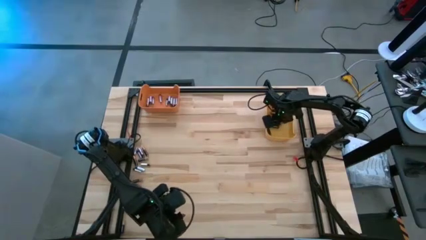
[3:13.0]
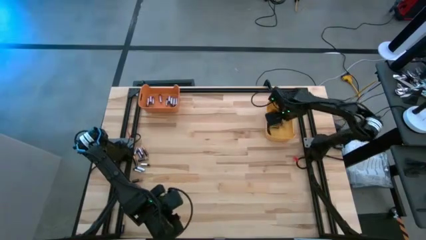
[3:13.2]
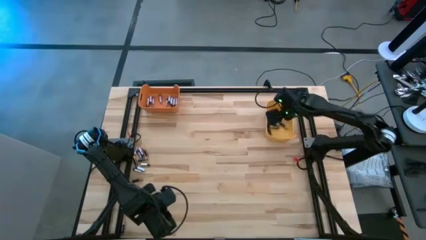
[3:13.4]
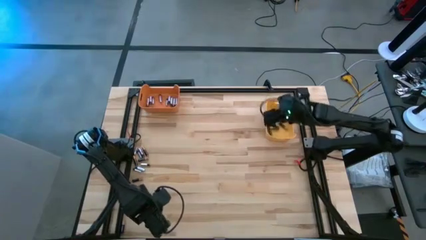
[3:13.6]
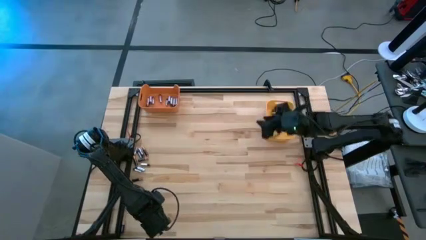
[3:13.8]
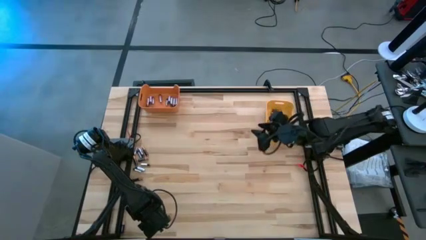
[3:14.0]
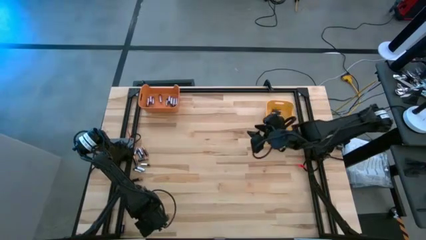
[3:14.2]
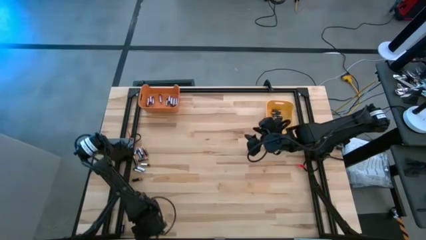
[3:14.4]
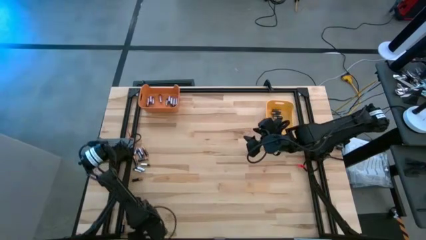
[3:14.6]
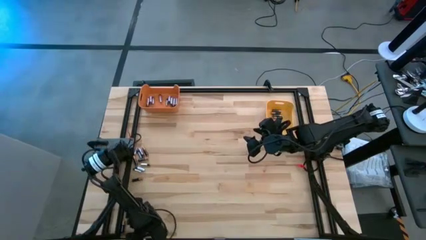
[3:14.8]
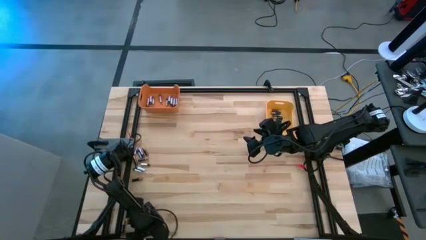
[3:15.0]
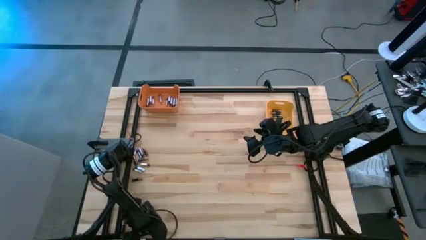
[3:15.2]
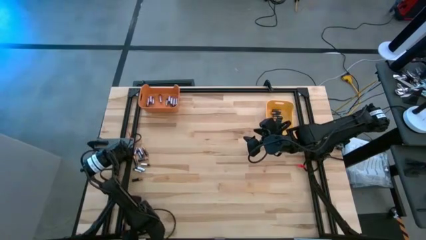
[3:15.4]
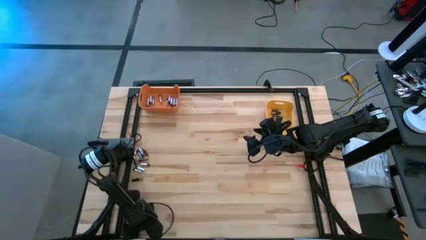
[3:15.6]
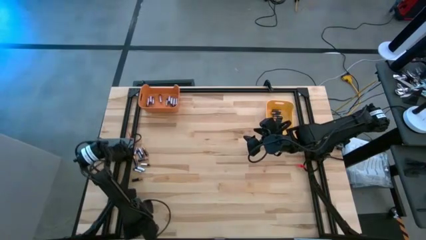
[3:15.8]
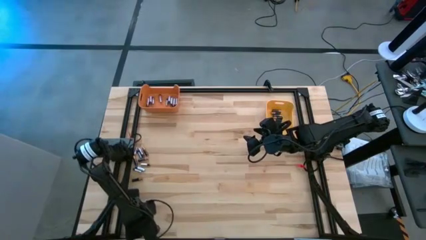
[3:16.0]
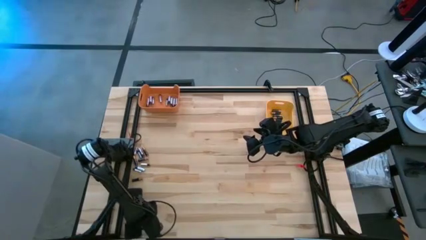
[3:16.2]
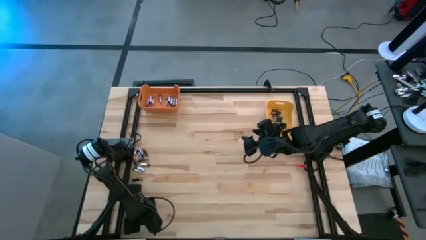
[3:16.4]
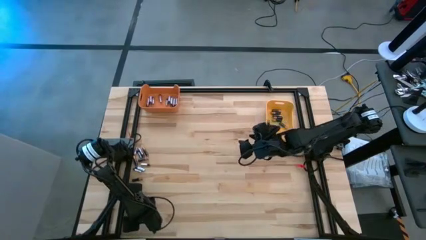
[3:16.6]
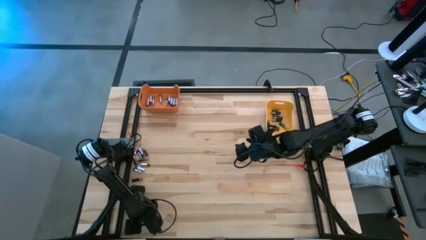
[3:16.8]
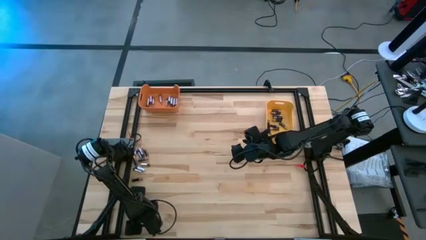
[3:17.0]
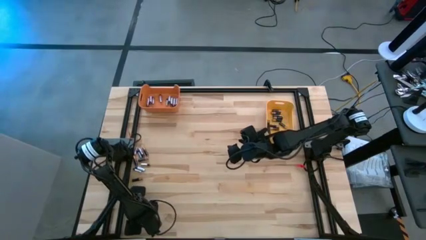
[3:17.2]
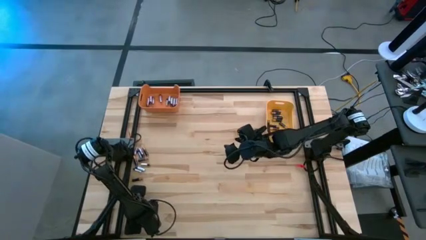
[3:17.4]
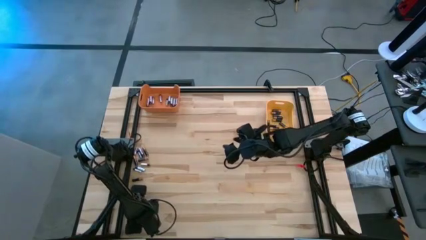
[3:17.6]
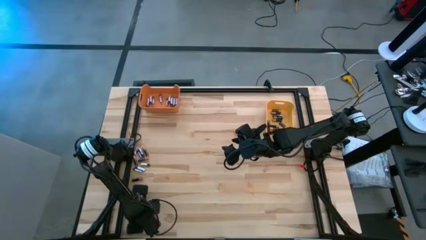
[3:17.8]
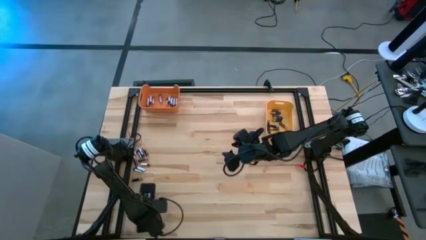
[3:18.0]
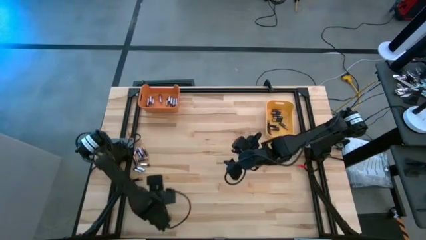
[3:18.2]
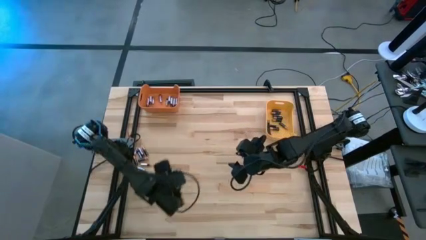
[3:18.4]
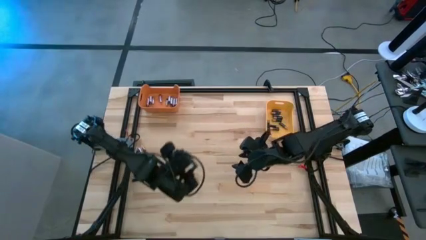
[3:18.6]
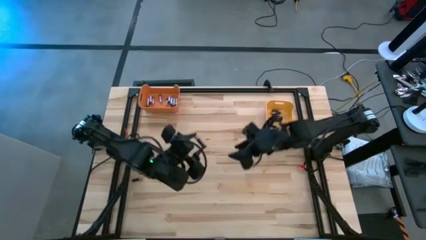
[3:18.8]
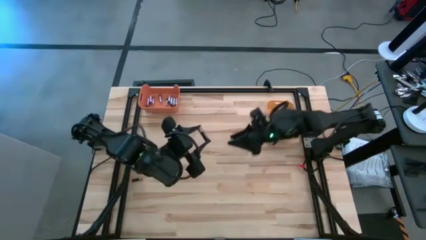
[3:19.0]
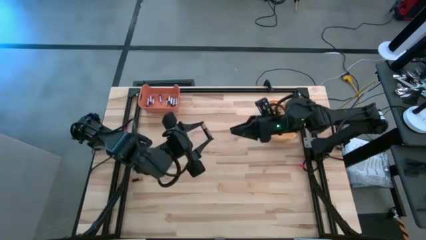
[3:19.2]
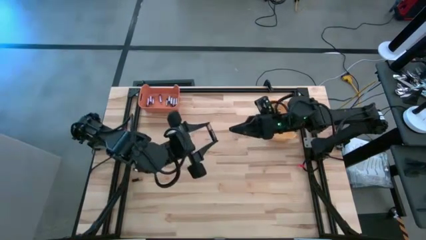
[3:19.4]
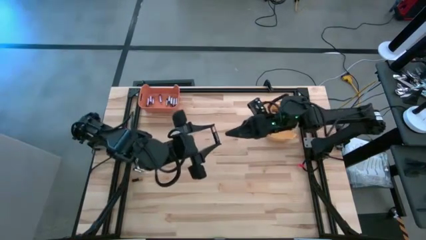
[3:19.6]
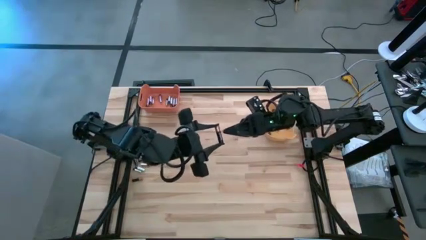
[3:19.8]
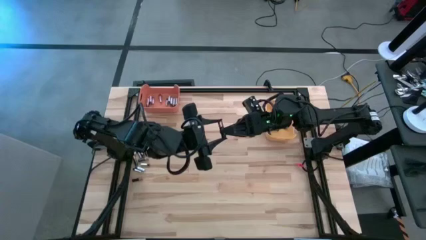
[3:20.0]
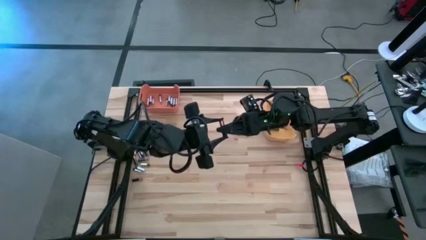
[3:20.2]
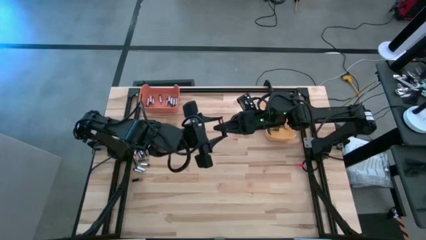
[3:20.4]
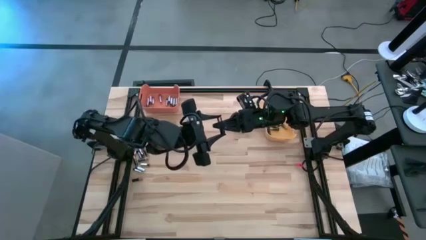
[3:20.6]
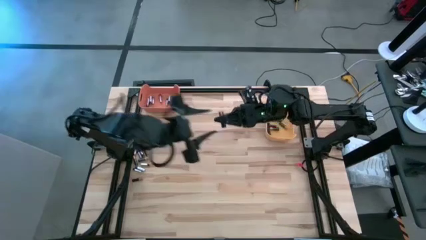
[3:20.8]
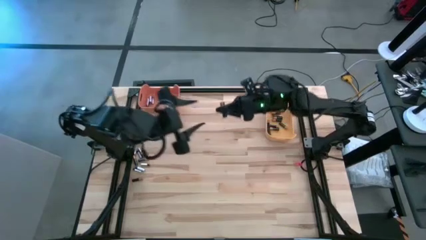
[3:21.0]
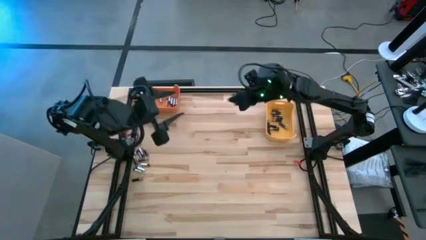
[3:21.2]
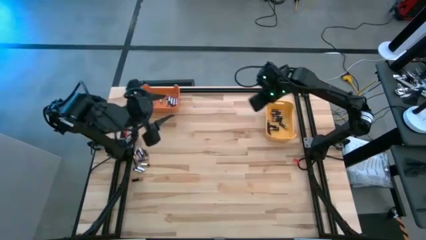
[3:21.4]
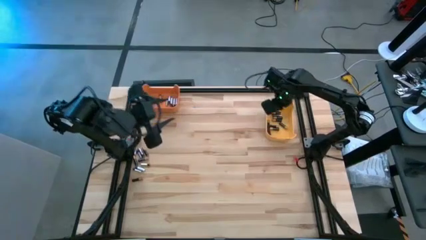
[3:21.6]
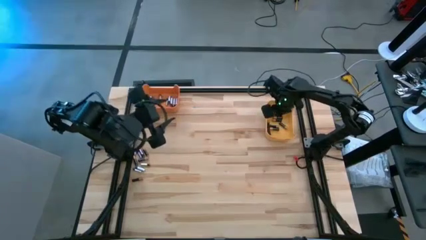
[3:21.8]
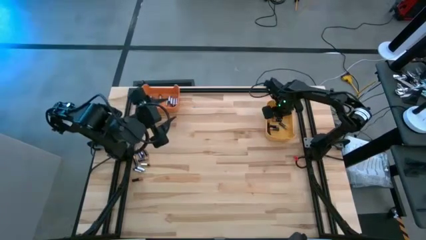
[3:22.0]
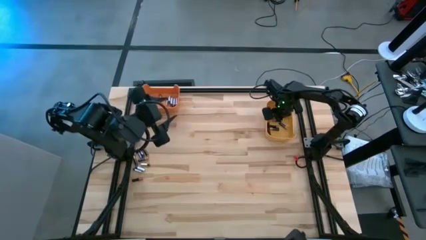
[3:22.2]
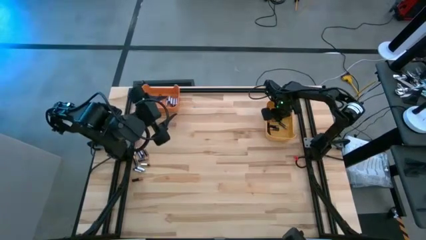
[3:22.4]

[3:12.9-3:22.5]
Task: Sort batteries
Put the black battery into the yellow bin

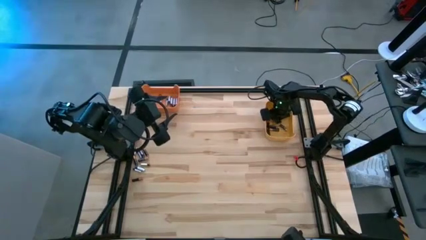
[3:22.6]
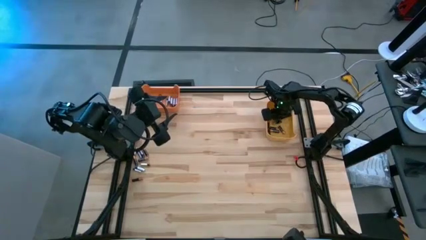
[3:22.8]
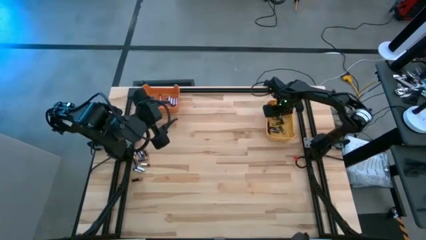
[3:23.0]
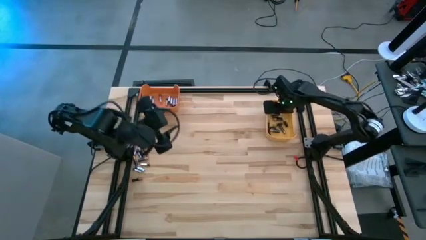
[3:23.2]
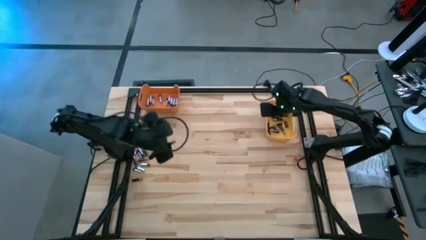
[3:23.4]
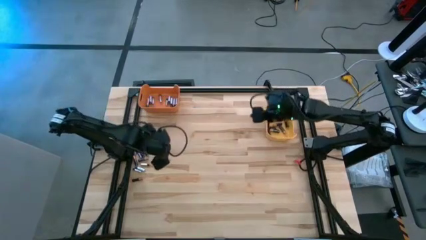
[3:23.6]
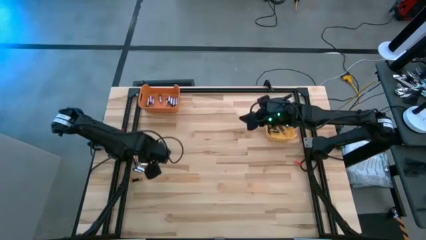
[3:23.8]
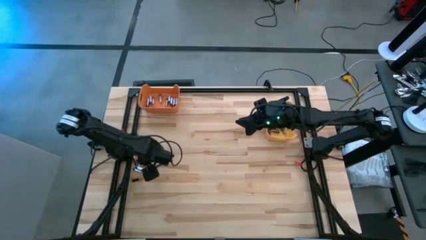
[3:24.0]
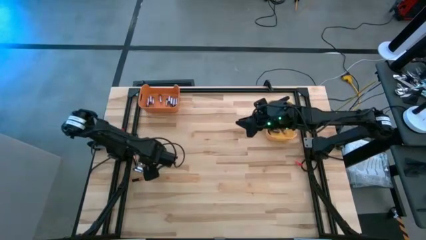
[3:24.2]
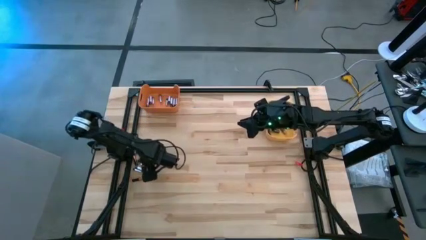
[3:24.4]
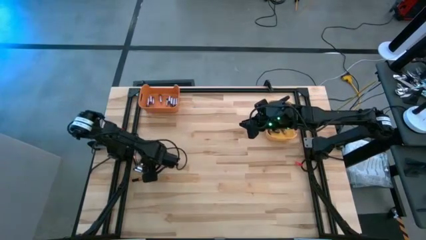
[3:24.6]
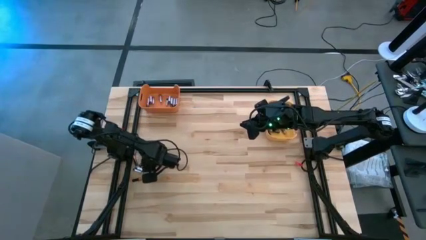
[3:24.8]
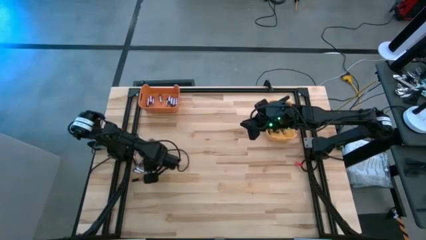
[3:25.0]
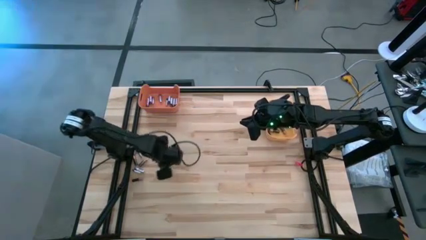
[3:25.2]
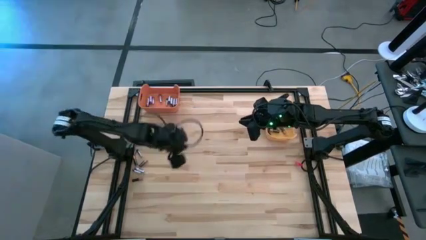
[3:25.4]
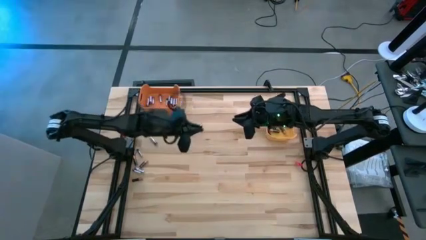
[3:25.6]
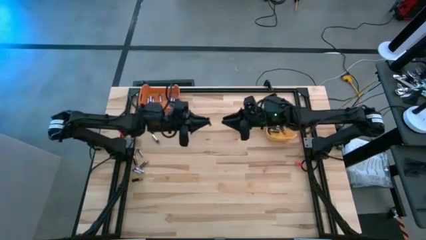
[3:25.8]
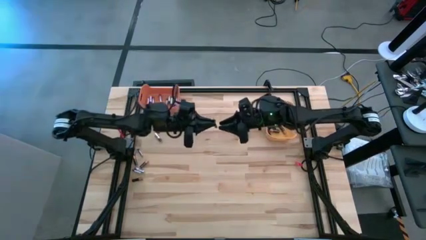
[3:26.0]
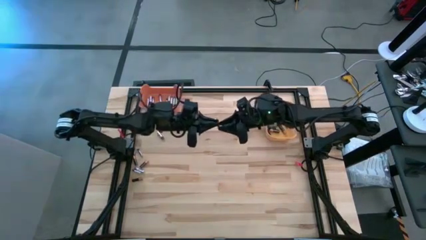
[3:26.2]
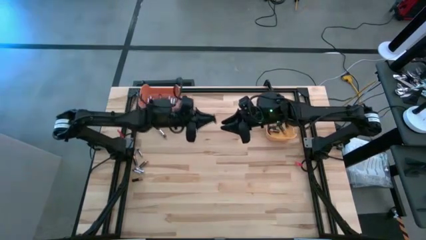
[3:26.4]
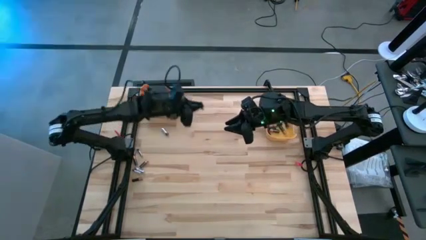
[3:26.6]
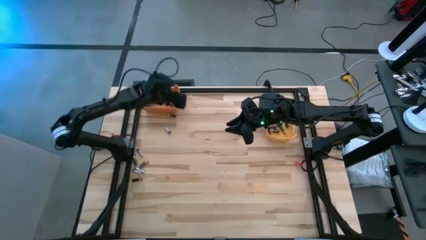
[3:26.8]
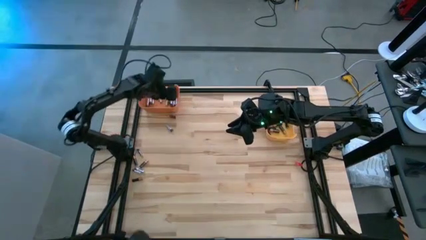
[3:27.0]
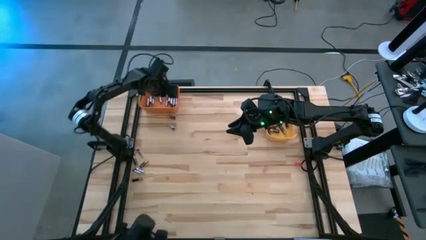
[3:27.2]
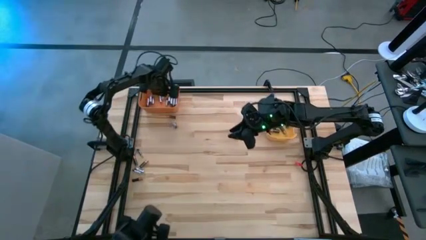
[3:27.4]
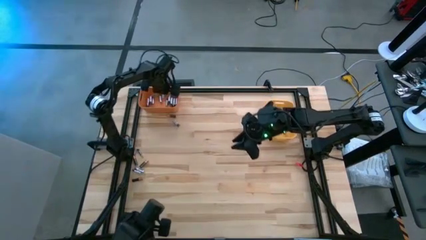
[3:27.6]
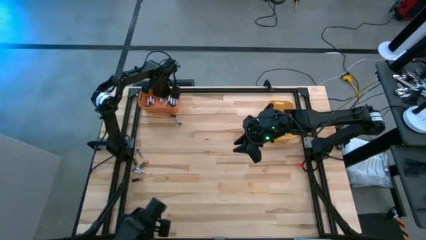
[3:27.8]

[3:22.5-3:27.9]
Put the silver battery into the orange bin

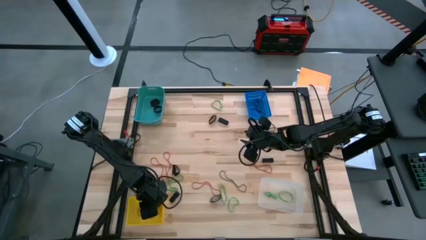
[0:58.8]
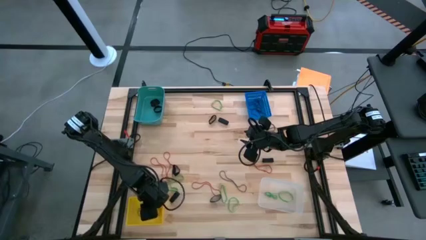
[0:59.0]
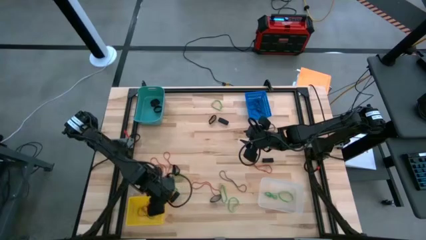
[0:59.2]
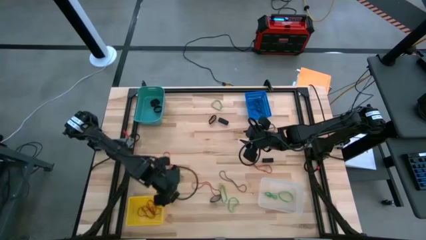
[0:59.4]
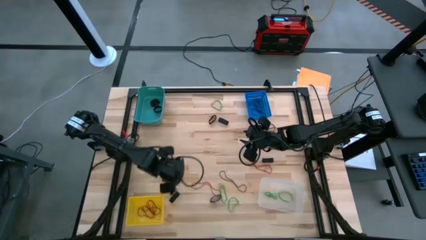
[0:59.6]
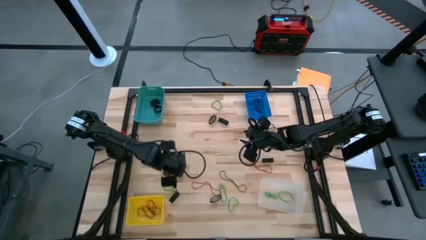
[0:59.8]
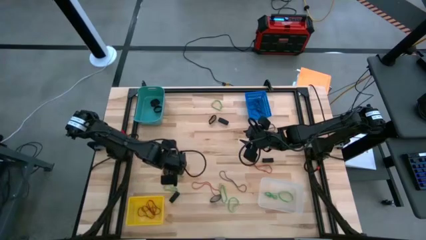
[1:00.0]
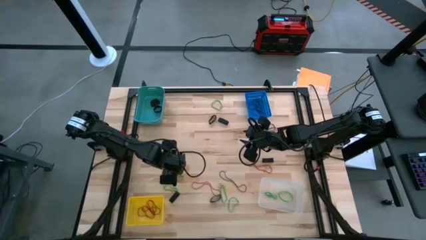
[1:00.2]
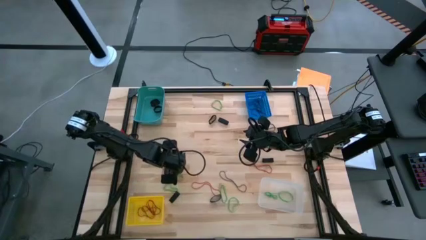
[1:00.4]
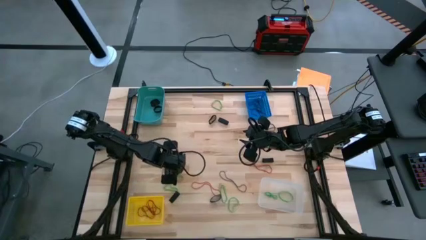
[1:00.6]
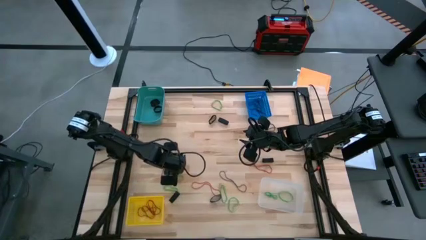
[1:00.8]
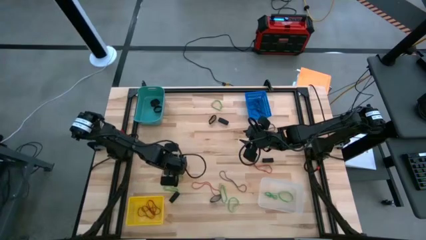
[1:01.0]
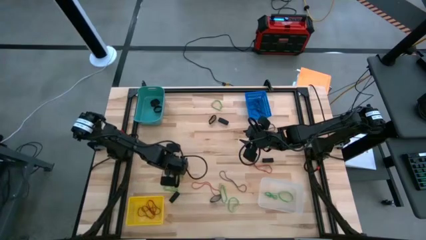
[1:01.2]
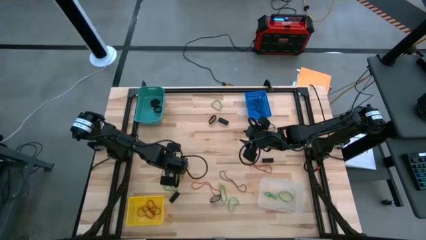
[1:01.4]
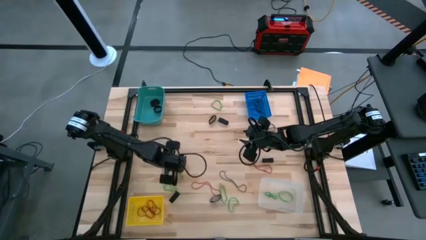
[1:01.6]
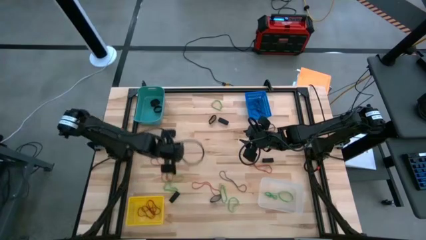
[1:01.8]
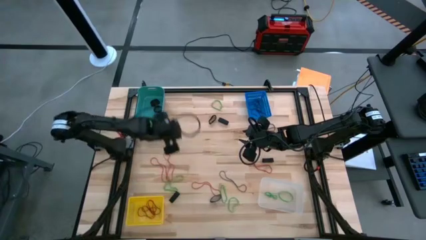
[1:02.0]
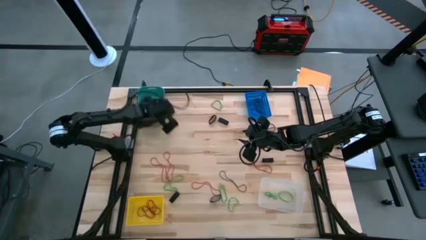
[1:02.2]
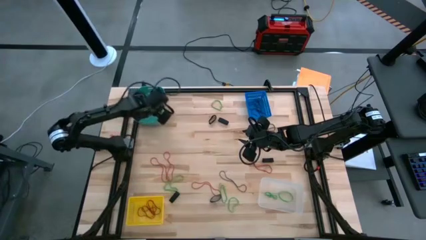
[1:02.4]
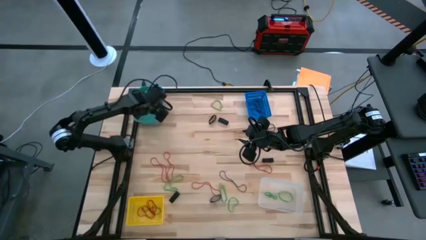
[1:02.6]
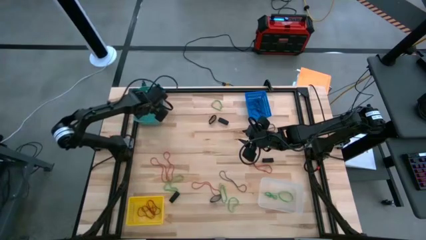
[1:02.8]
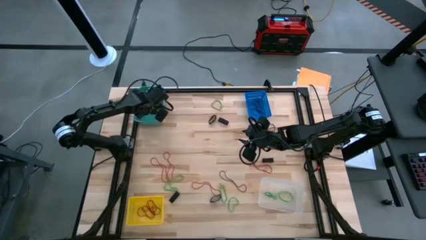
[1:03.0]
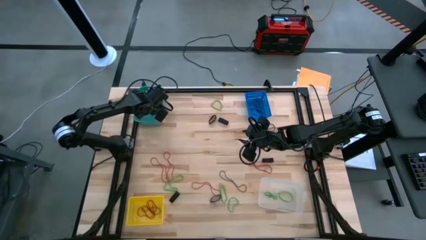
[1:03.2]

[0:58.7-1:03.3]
Task: Sort rubber bands into baskets
Put the thick black rubber band into the light blue bin
